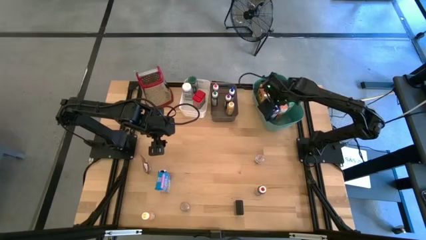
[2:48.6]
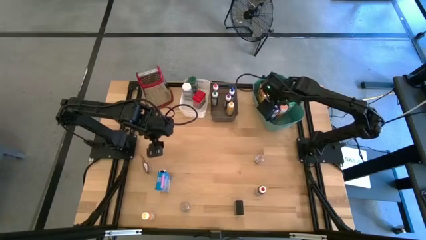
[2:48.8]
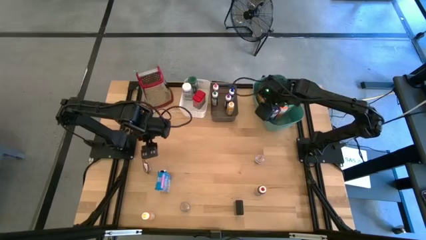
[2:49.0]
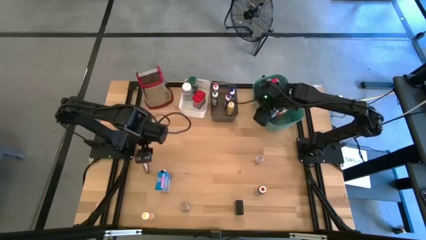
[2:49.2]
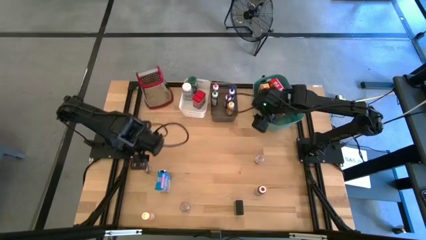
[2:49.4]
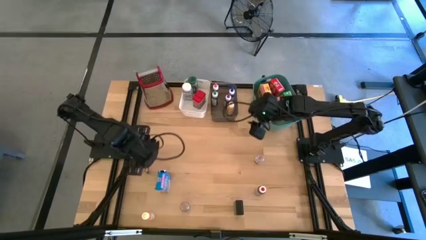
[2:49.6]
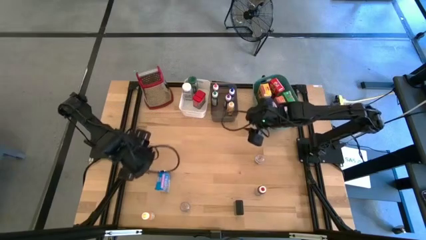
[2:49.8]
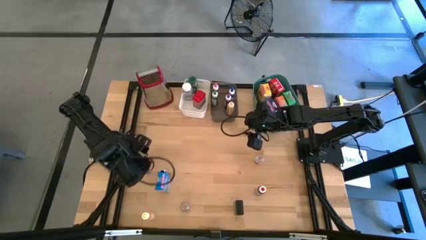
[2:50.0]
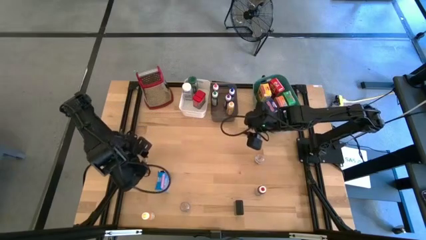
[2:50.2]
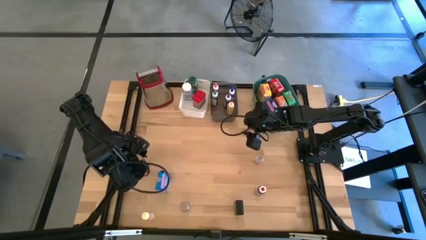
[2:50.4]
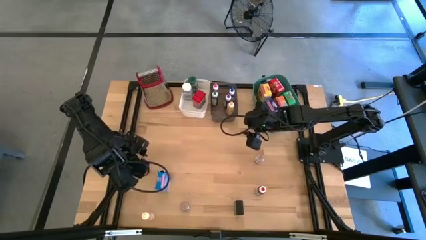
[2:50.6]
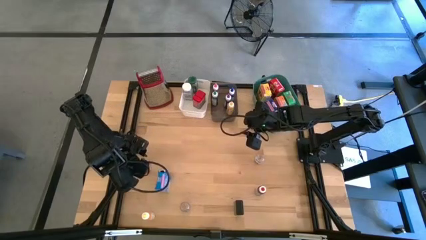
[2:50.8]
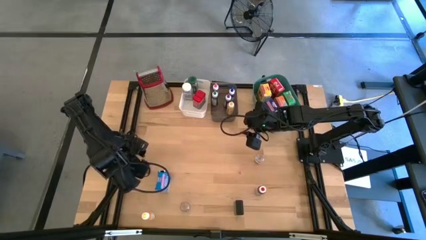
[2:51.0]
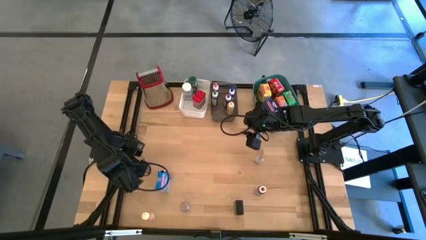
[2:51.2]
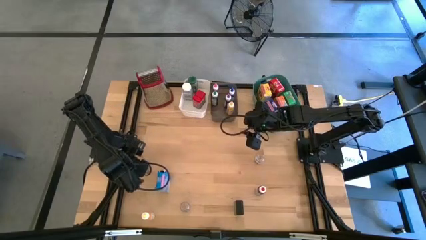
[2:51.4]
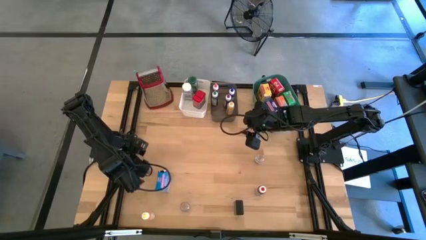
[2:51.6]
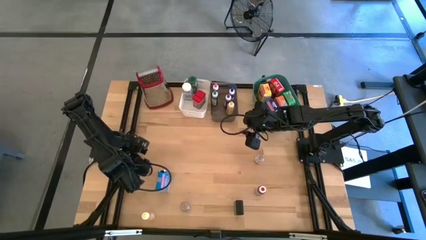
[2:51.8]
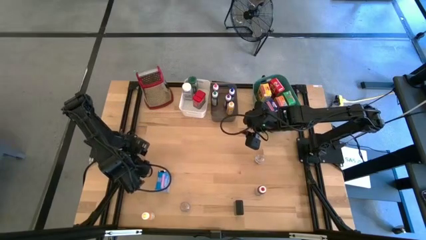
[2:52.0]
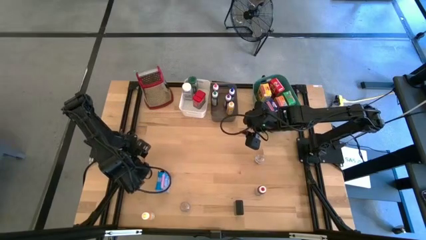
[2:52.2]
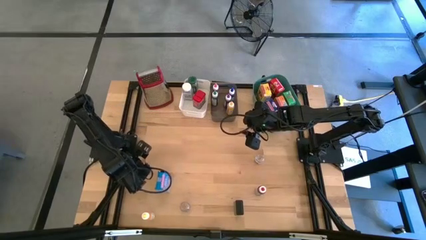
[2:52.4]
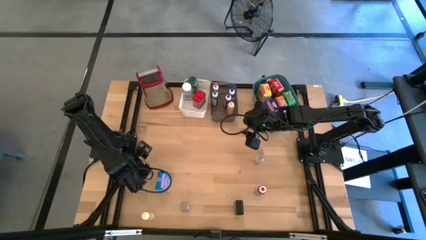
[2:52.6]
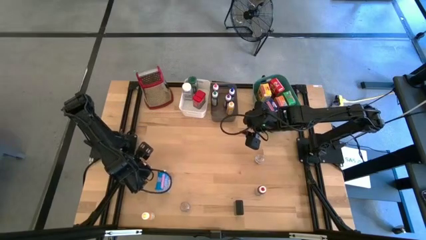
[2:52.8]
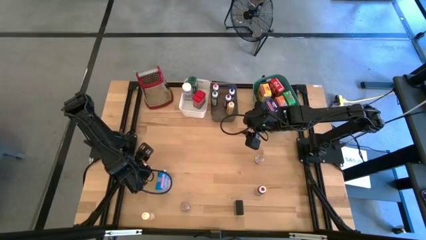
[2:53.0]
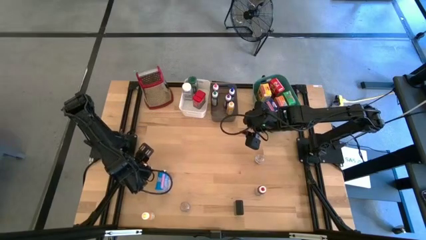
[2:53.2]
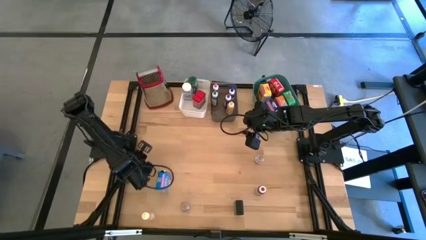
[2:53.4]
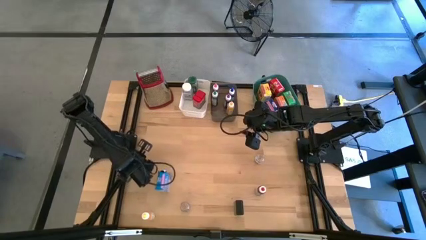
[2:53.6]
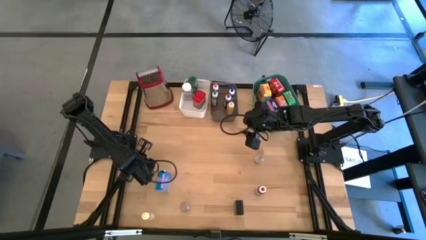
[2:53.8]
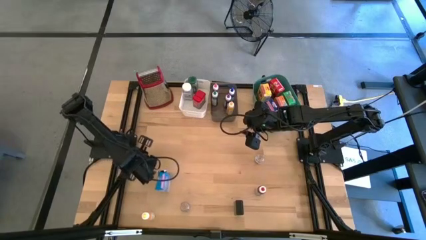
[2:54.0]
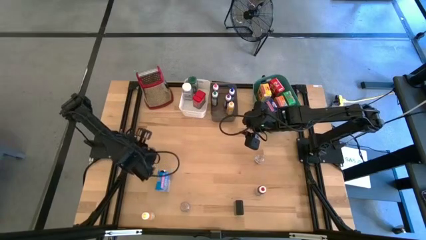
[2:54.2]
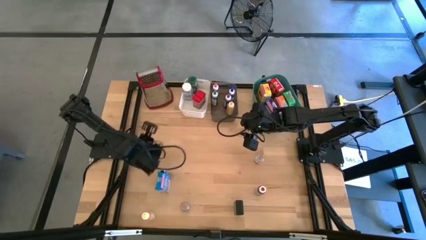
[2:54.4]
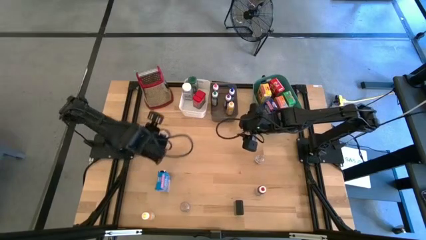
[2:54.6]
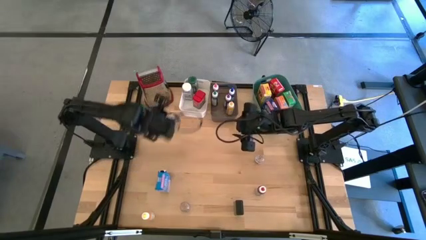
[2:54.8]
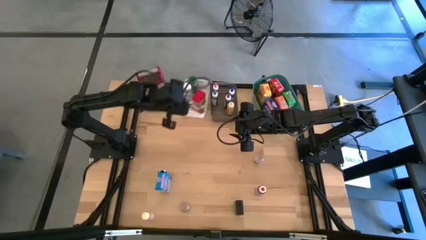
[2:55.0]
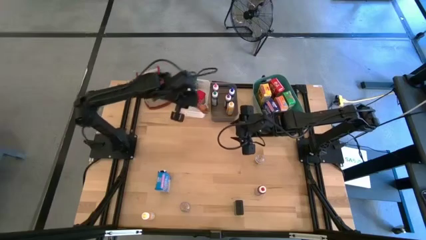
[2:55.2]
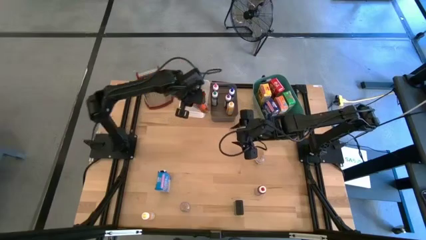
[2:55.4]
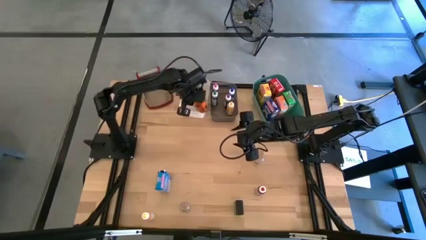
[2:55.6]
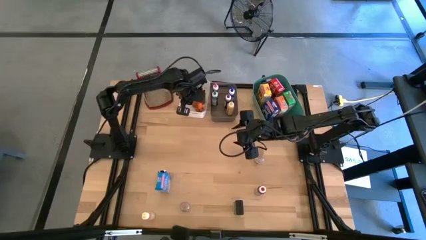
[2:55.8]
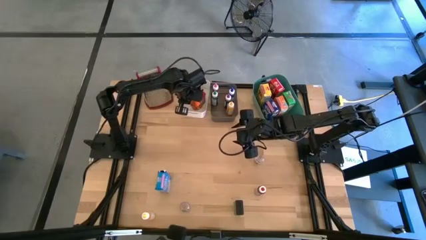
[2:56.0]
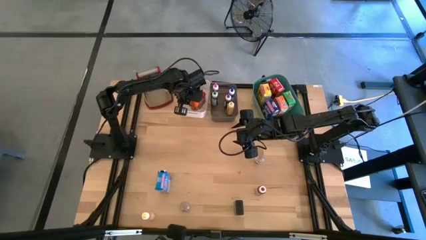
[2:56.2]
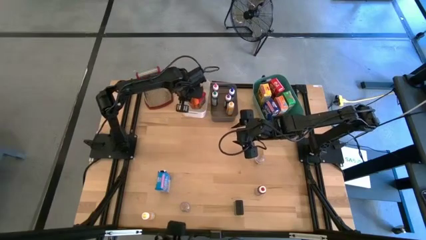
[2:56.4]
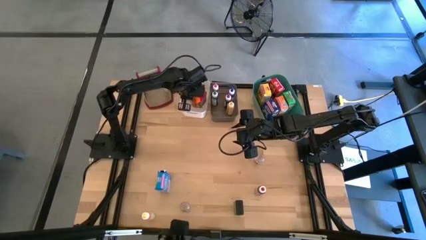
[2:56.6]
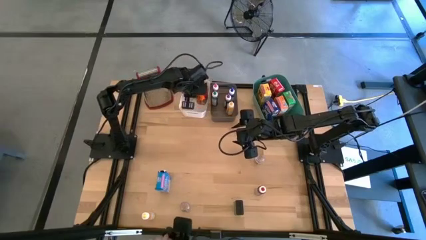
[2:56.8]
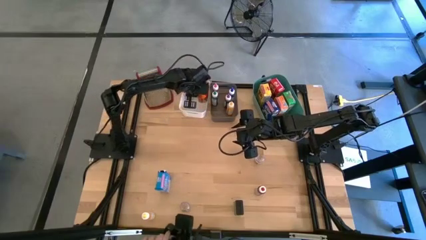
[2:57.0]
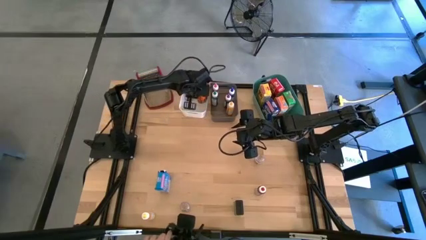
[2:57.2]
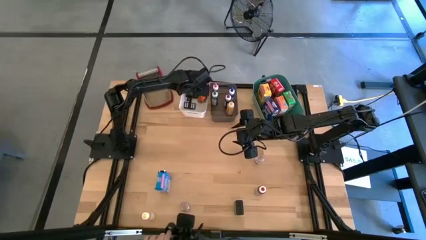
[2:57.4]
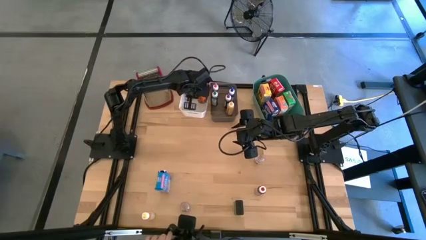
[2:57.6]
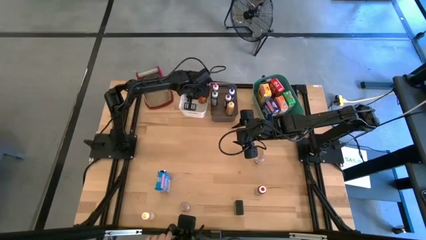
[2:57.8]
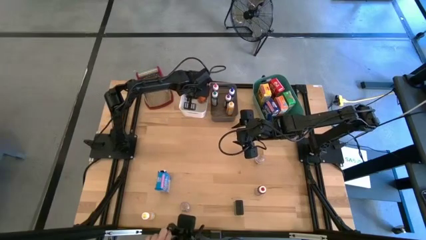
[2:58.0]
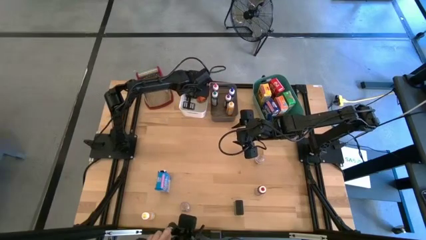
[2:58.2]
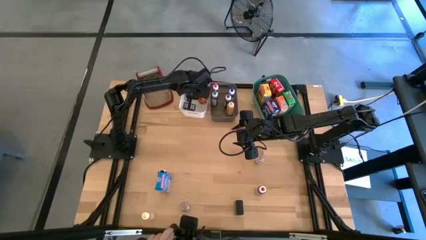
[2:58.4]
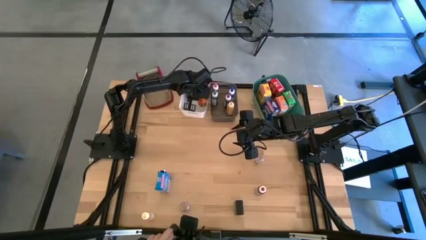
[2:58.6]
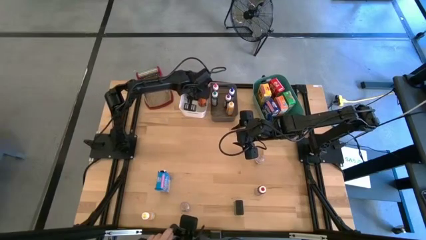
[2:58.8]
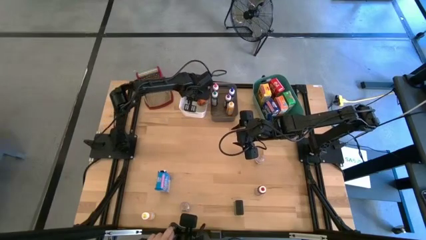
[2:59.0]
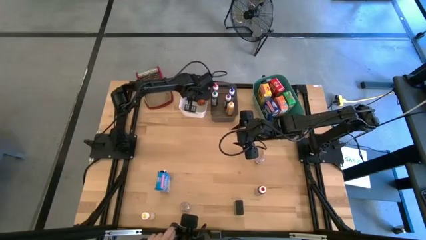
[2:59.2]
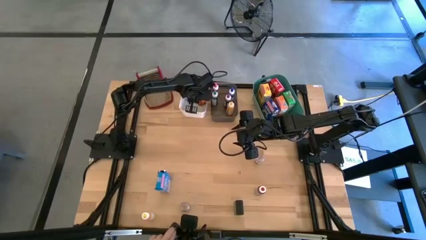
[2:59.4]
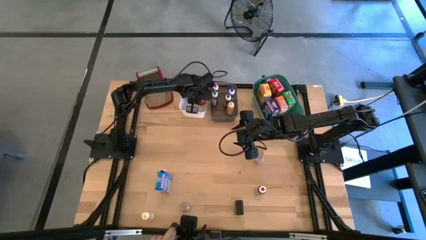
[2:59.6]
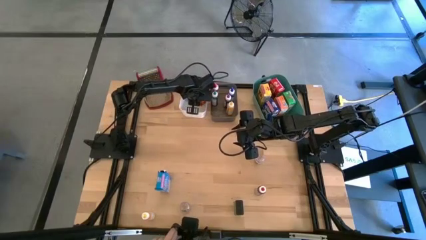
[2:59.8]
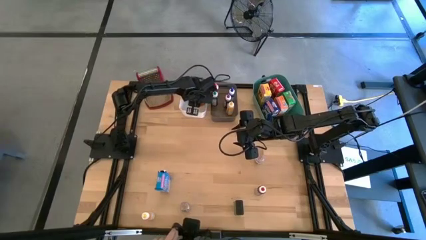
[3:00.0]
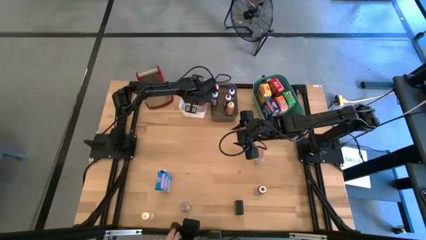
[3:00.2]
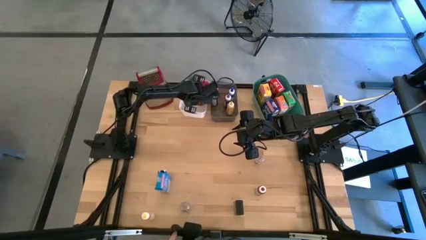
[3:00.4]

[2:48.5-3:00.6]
Task: Pick & Place Kitchen Items
Put the orange seasoning pack into the white bin

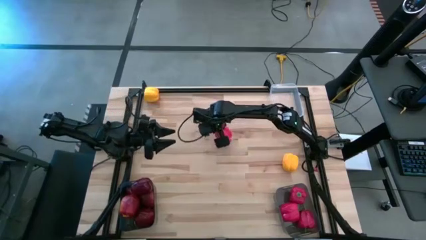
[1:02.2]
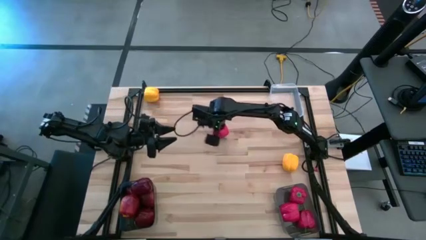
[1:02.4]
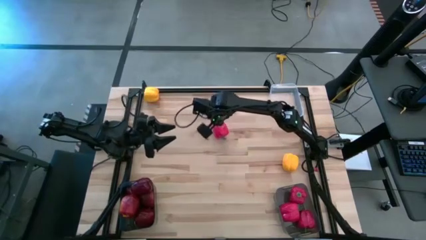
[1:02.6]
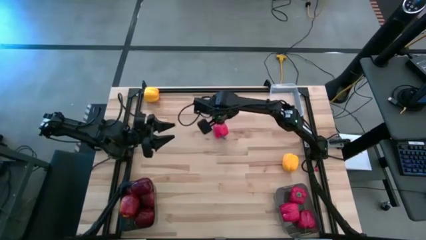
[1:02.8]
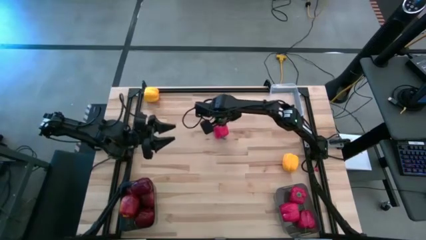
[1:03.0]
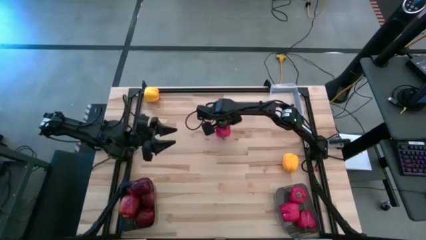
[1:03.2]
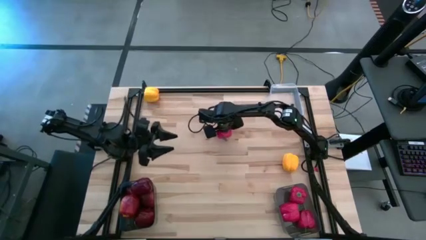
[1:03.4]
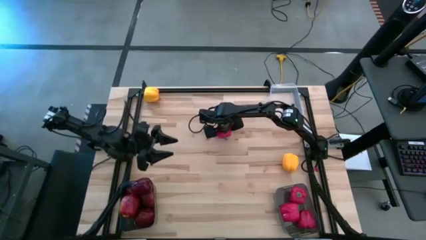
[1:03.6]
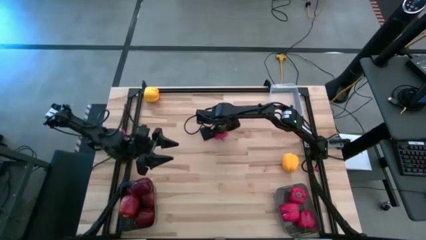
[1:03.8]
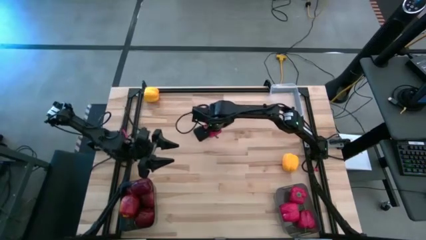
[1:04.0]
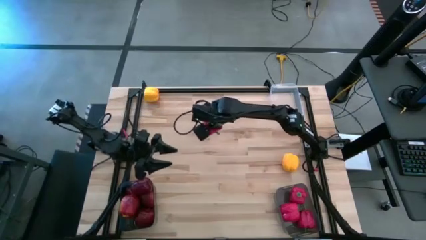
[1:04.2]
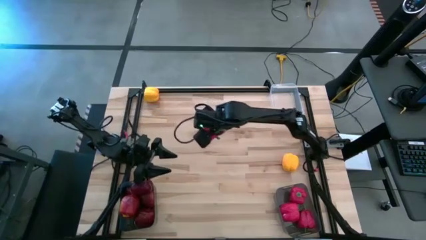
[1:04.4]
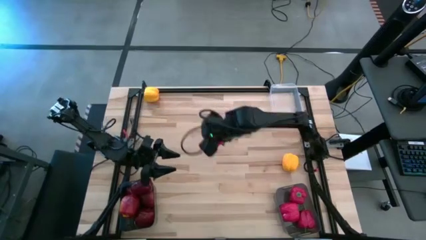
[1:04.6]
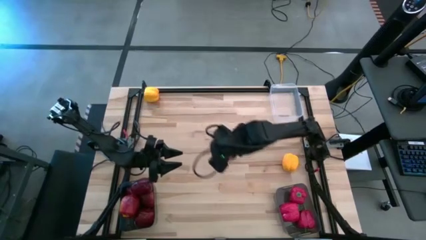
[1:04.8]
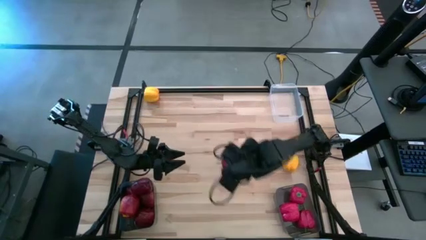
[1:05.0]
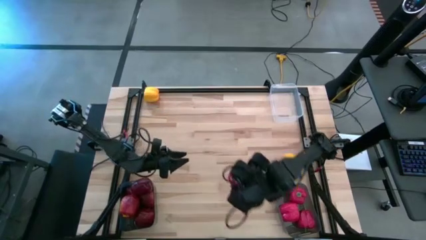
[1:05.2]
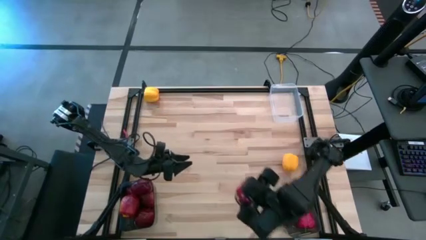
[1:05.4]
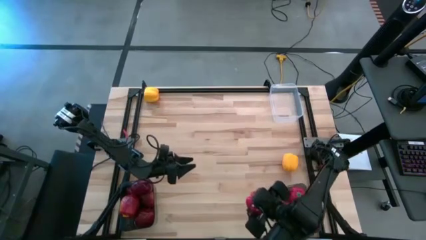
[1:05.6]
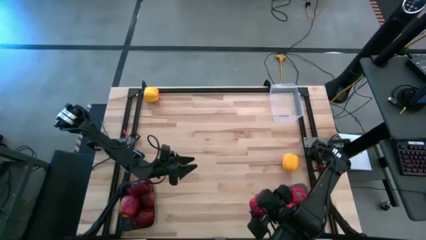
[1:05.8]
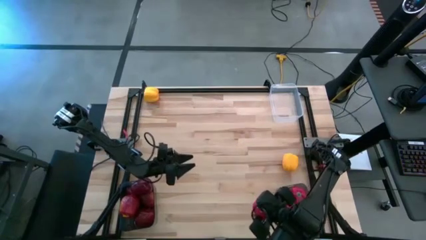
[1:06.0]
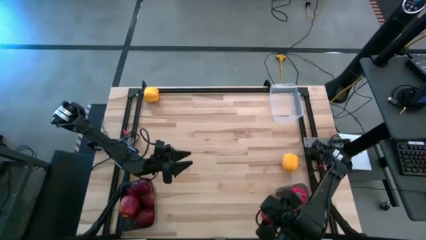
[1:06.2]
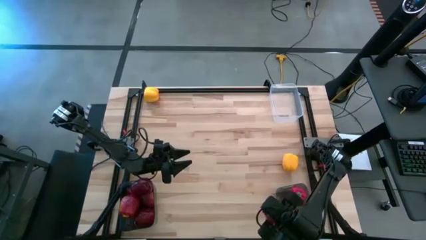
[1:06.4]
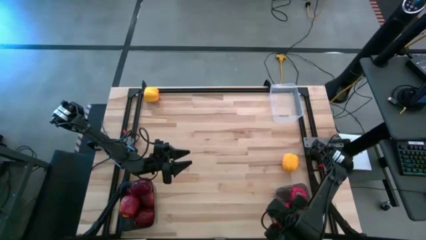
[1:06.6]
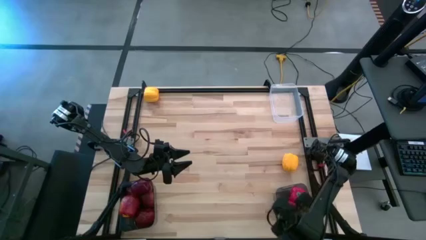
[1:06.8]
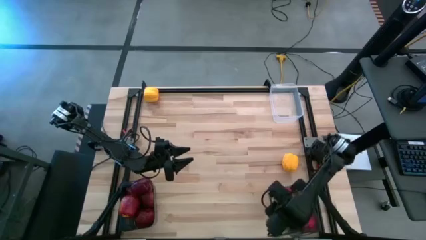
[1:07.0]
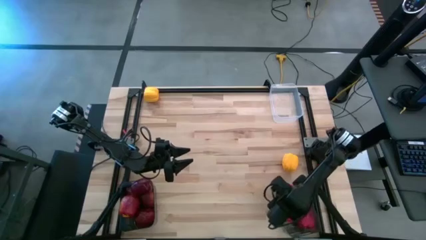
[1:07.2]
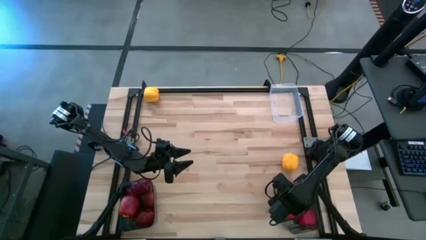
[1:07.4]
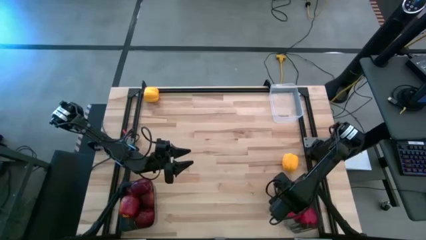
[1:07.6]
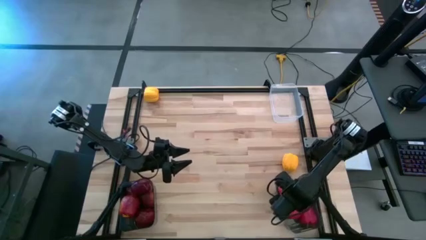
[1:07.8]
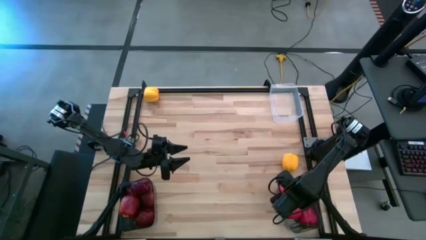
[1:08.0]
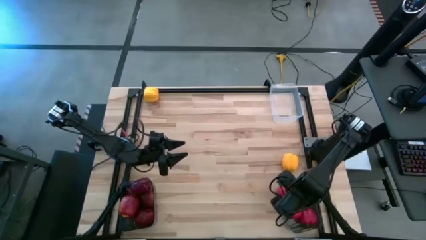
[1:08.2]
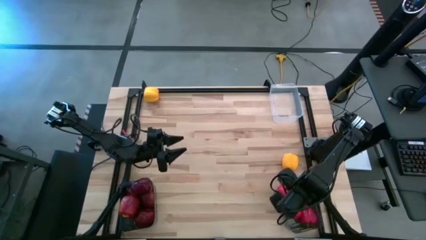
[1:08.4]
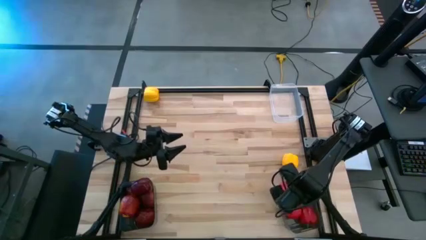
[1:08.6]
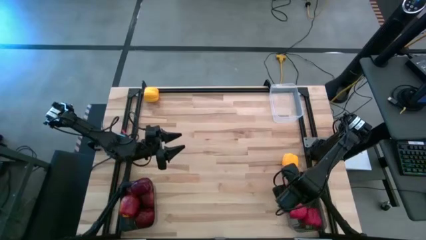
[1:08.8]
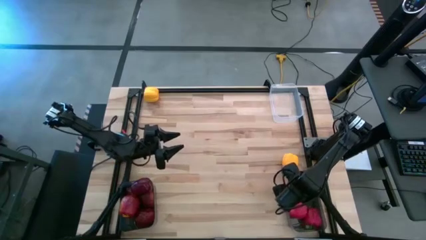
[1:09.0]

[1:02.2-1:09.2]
Task: Sort produce into baskets
Put the red bell pepper into the right black bin
